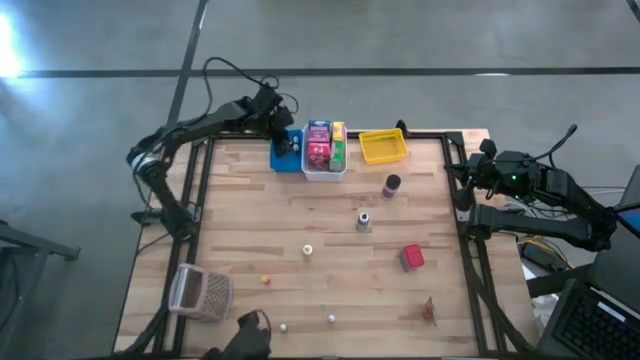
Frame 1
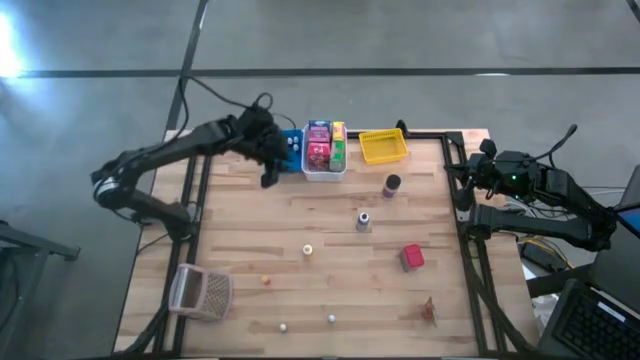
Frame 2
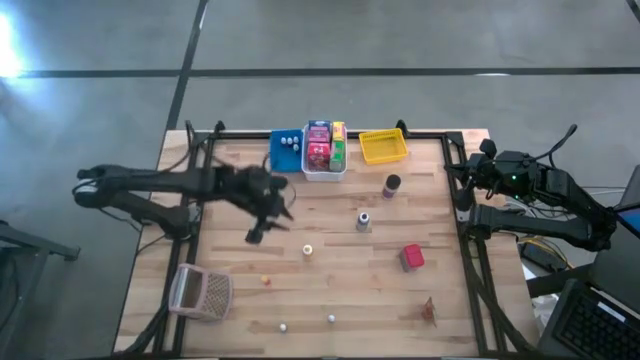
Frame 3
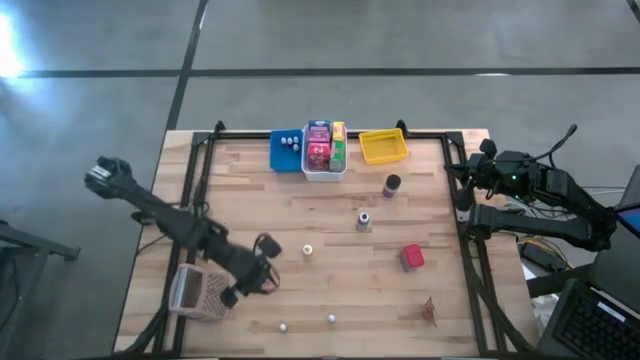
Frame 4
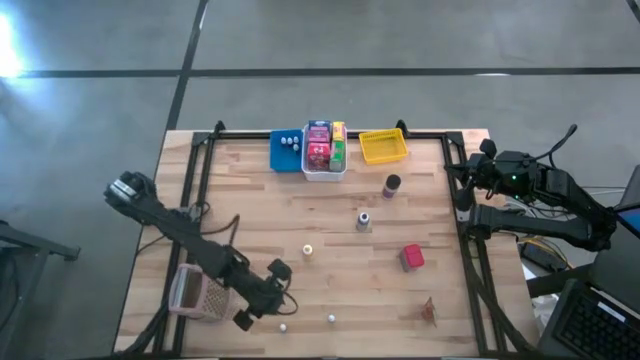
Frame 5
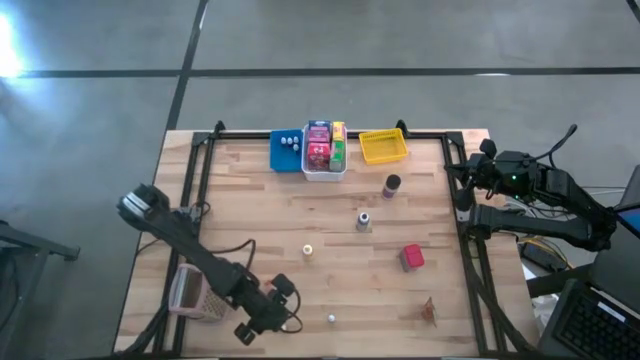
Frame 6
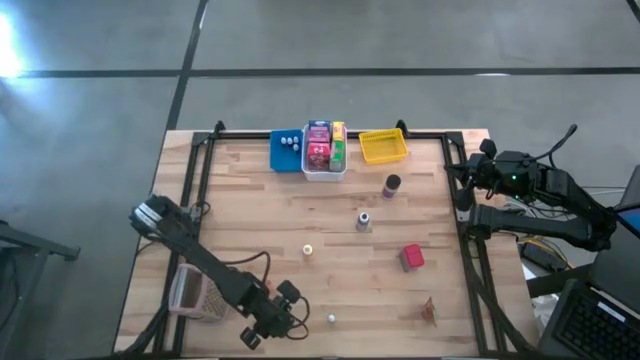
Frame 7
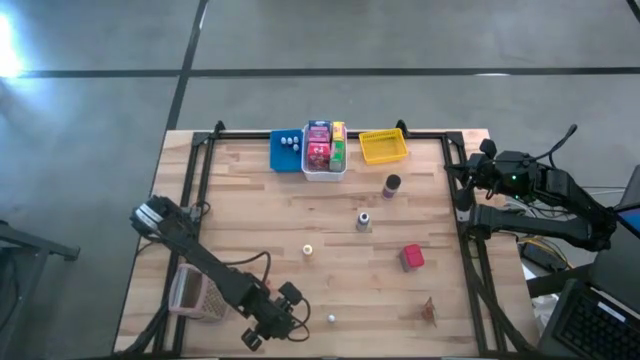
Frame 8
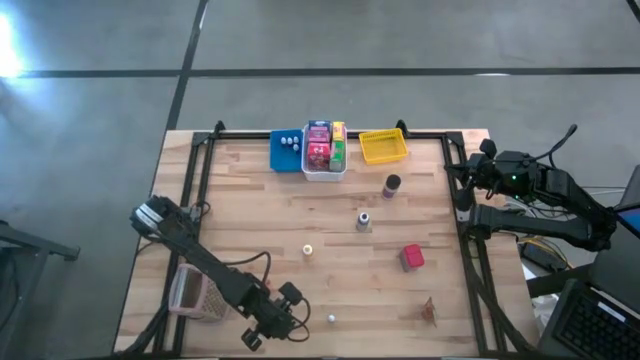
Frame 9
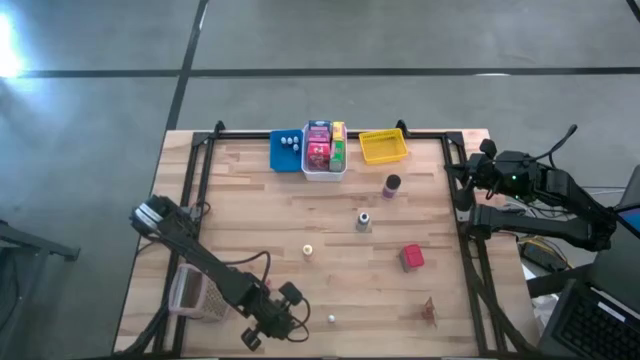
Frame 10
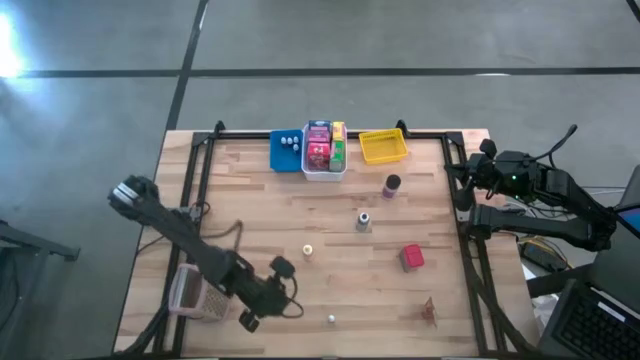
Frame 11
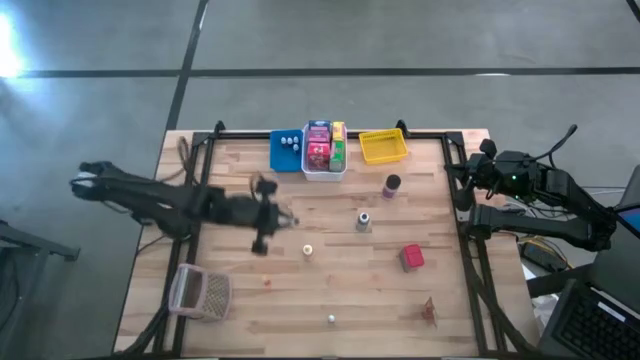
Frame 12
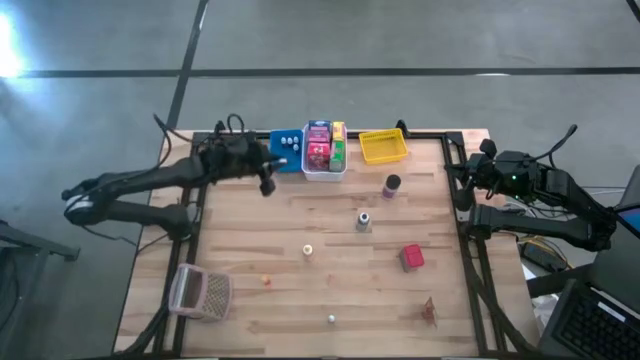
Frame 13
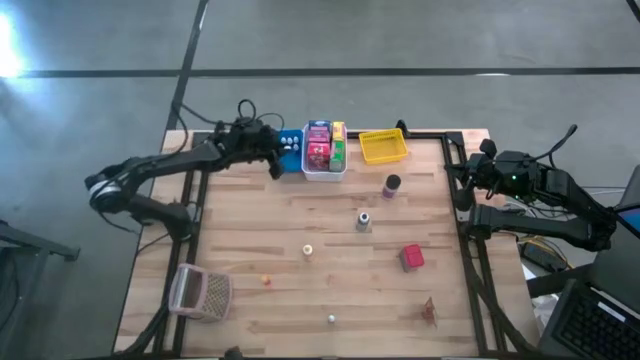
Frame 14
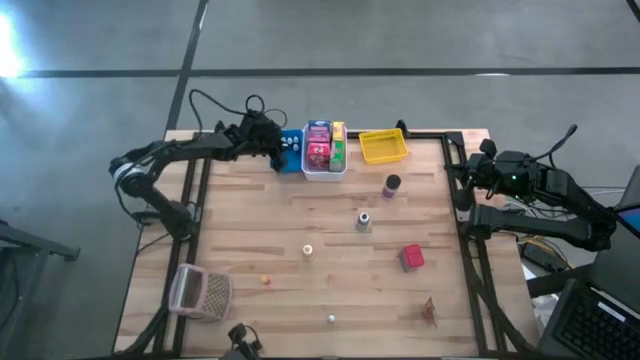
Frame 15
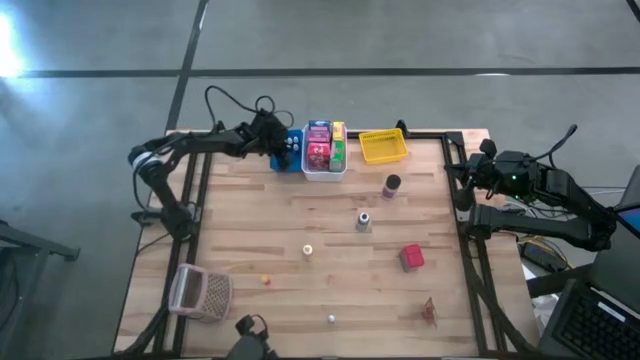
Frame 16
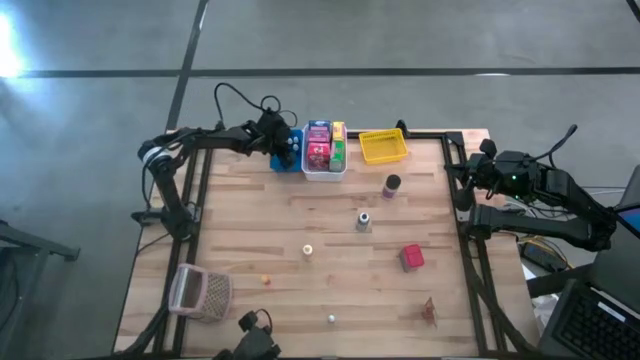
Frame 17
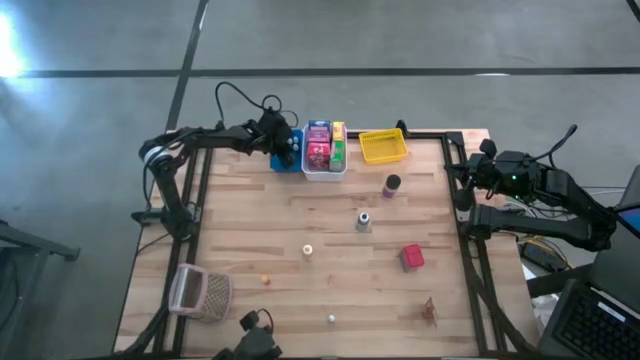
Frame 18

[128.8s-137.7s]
Task: Pick & Place Kitchen Items
Put the small bottom black food coloring bottle into the blue bin

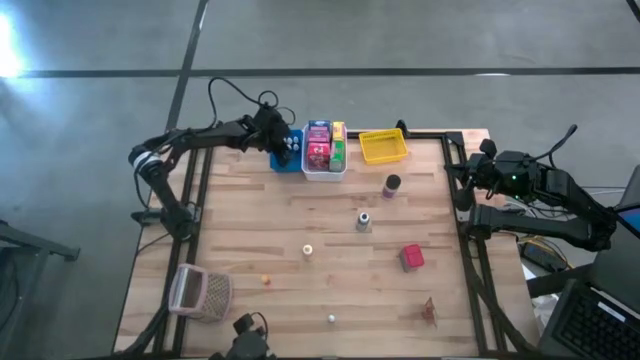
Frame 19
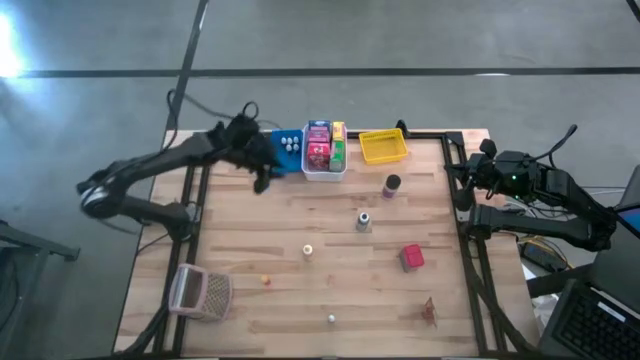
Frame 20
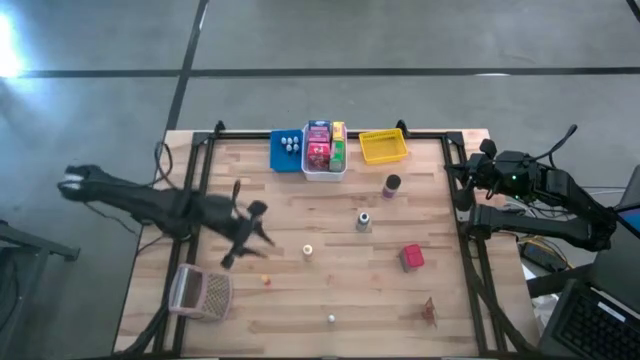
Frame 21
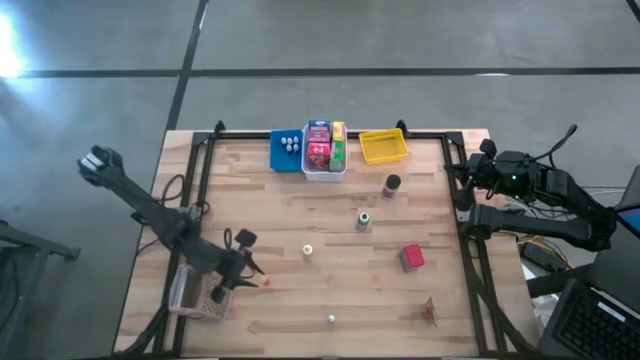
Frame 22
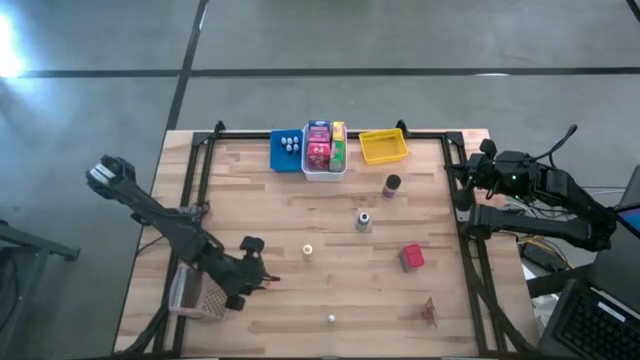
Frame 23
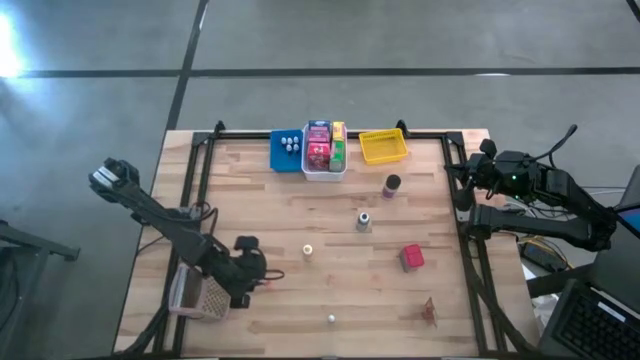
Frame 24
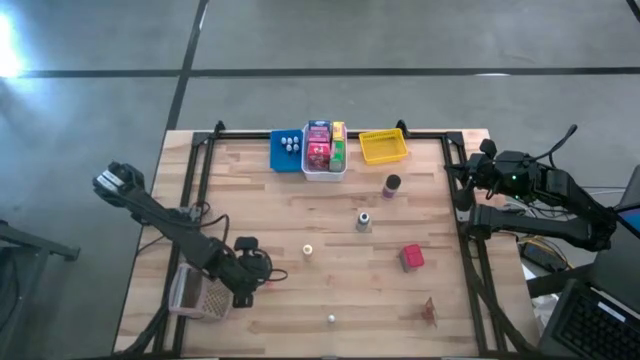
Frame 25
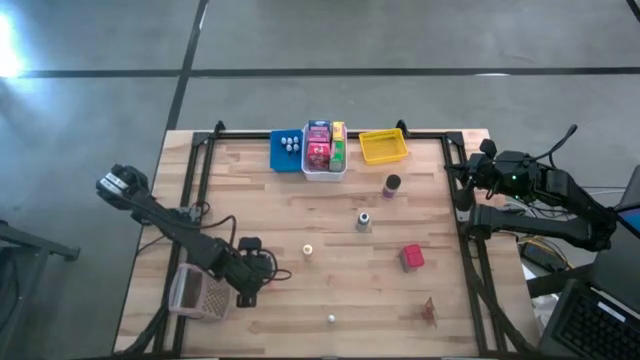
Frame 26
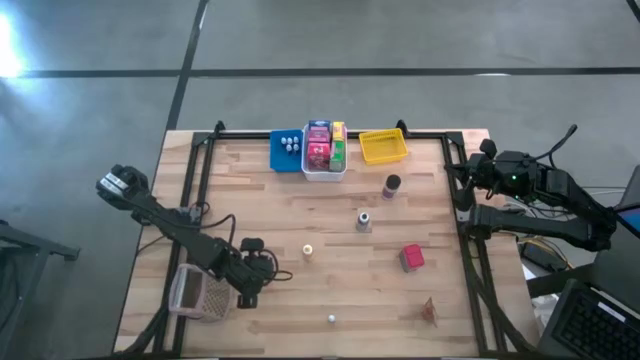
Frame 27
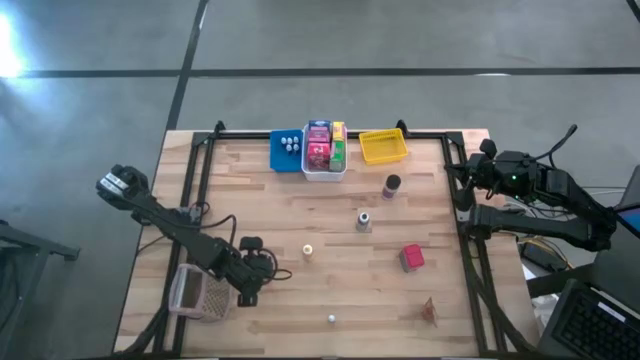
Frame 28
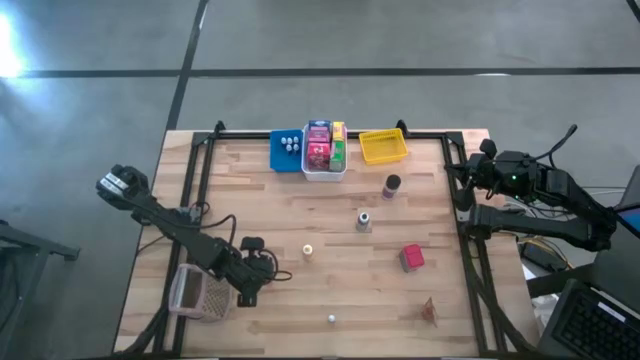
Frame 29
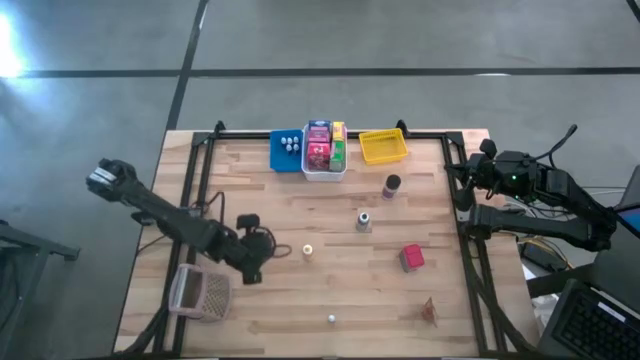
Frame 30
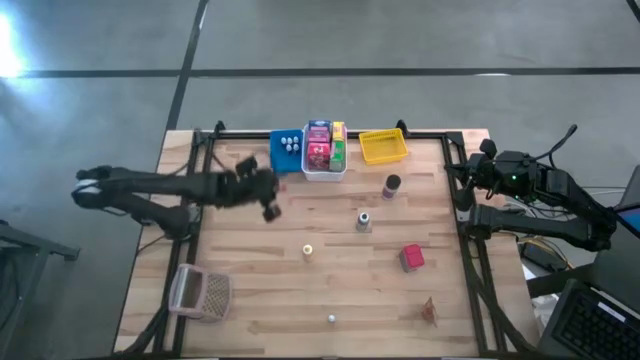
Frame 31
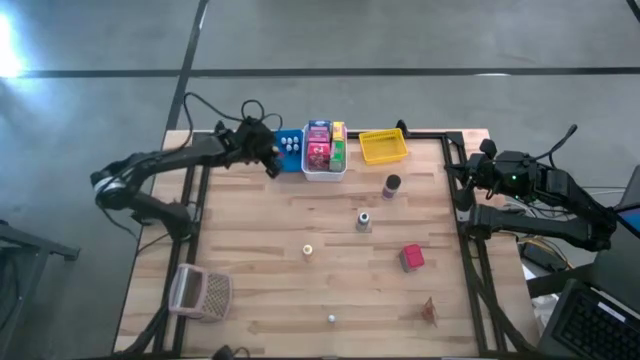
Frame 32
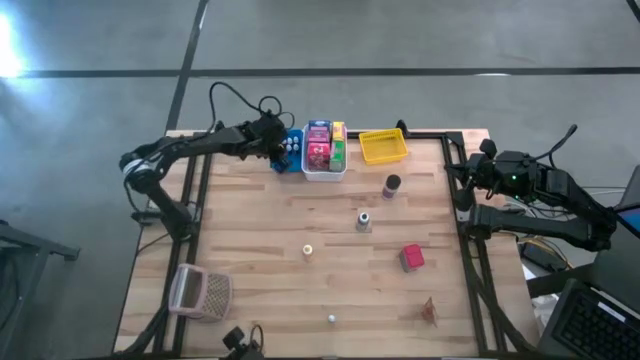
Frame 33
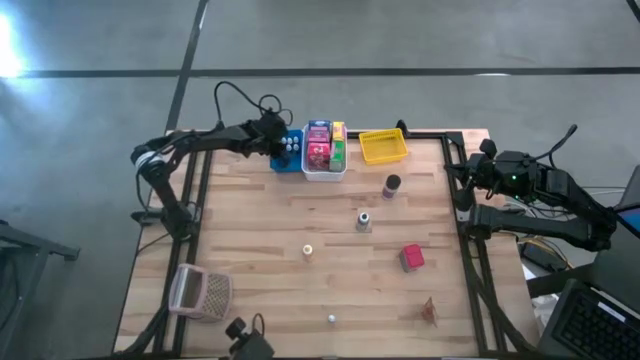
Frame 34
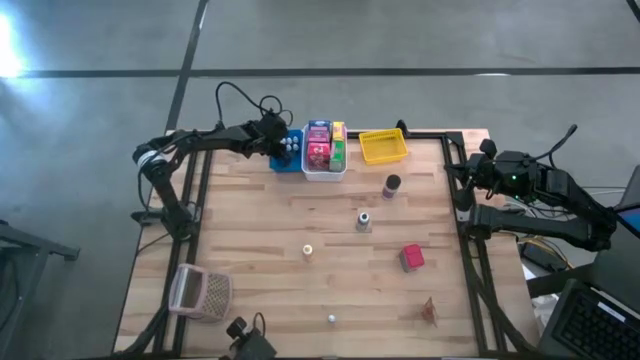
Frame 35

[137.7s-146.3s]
Put the transparent food coloring bottle into the blue bin

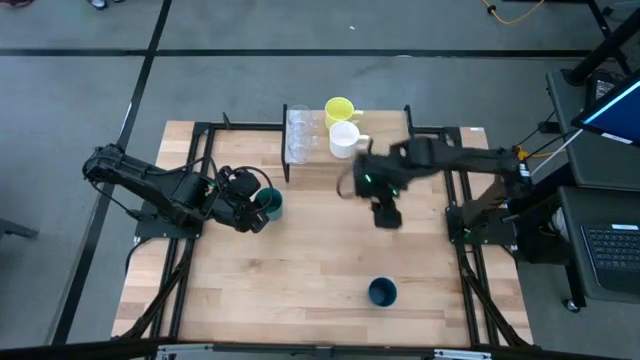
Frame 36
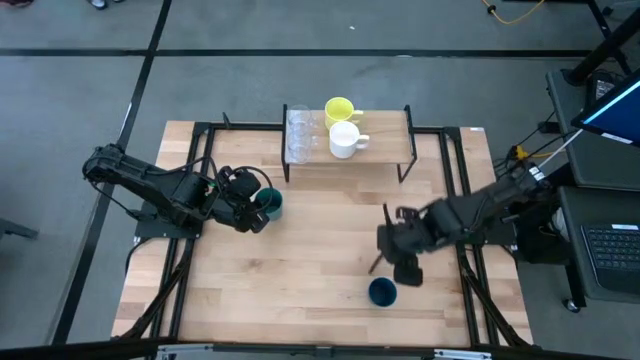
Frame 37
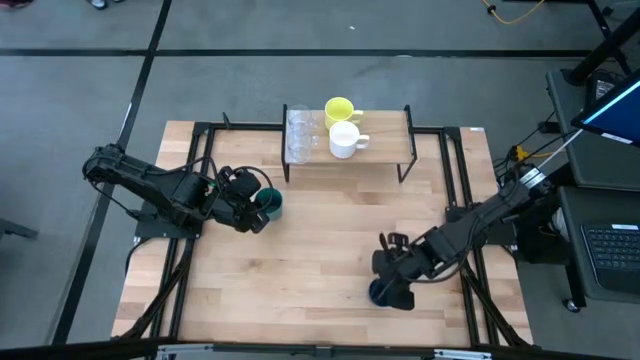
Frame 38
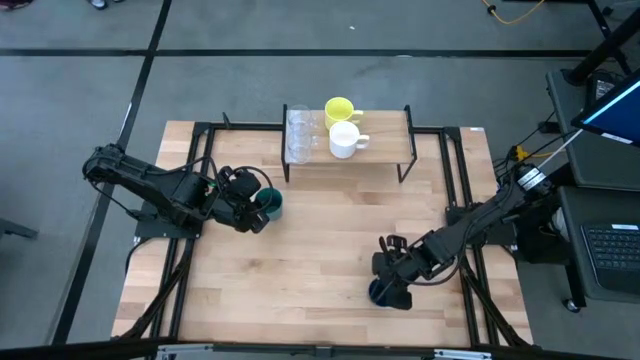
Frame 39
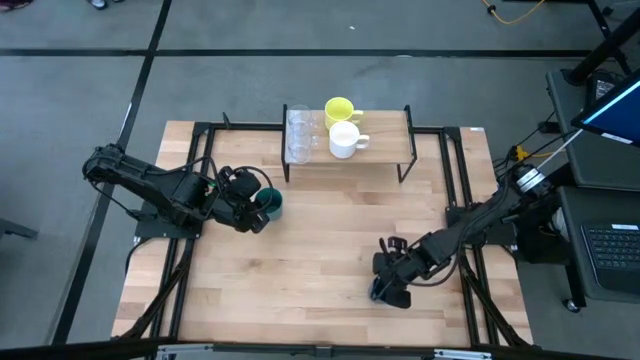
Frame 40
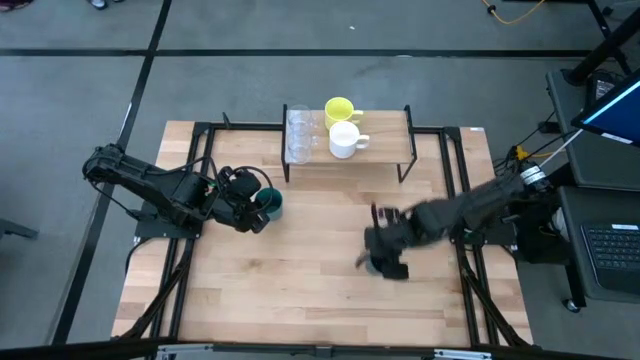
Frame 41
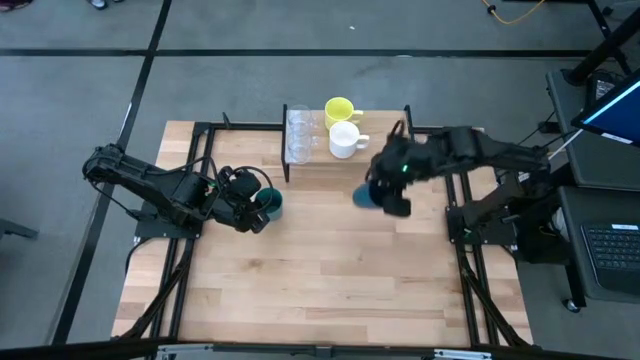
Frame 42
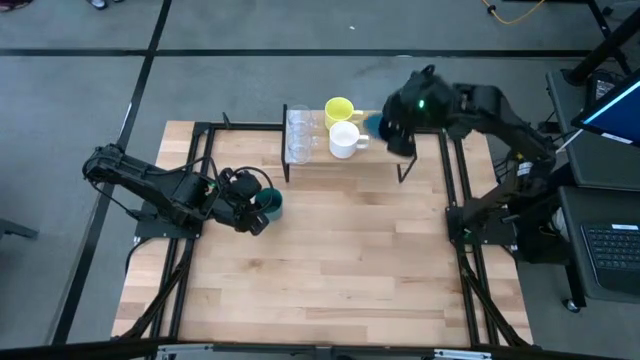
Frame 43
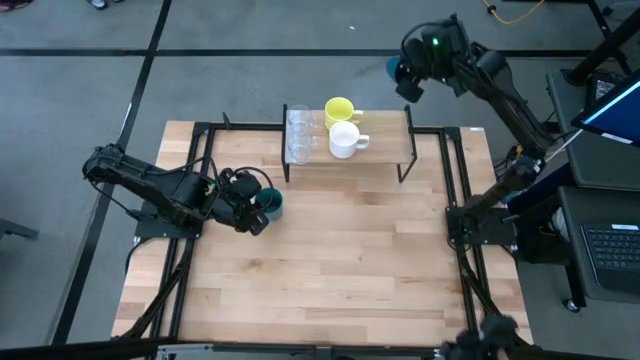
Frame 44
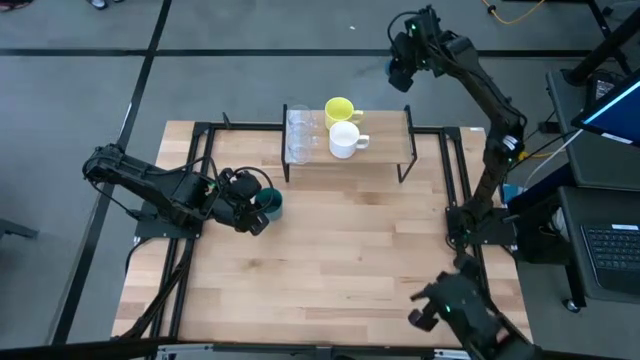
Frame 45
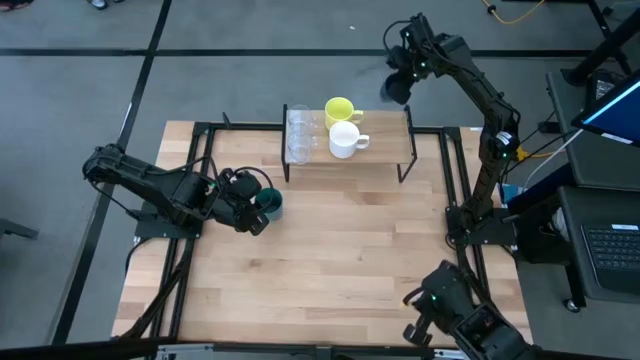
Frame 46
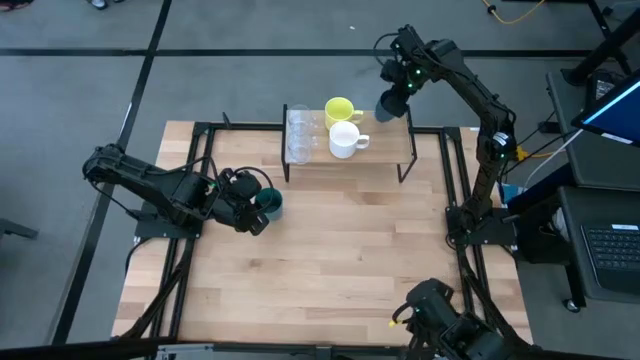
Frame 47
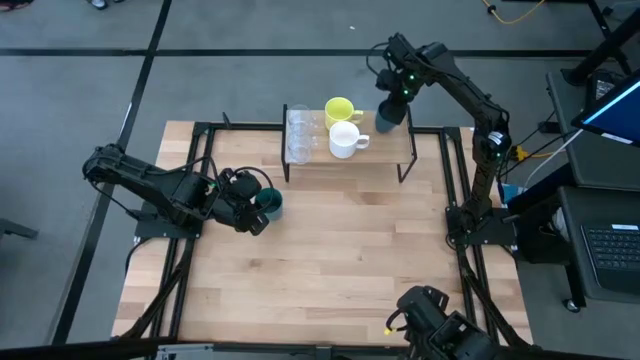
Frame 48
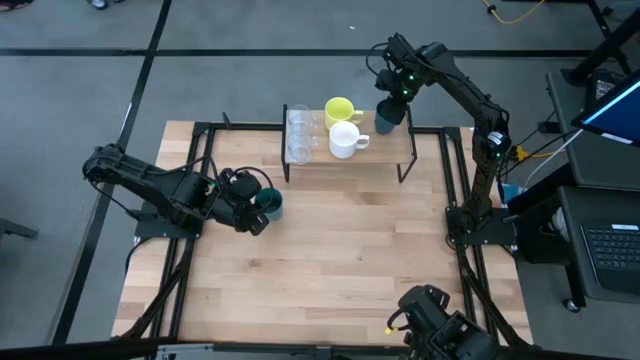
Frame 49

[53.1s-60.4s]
Task: Stack small to large cups/mugs on shelf
Put the dark blue cup on the shelf beside the yellow mug
